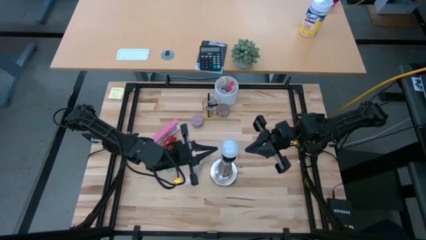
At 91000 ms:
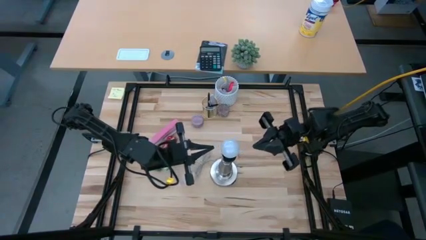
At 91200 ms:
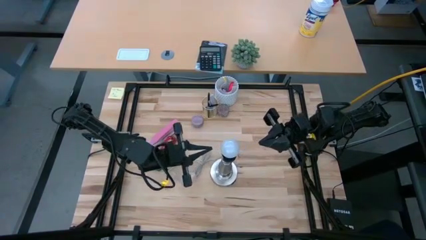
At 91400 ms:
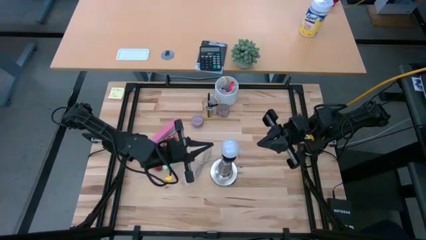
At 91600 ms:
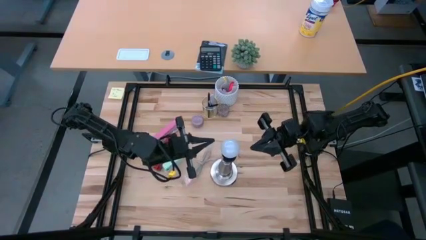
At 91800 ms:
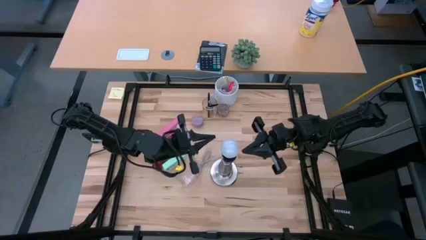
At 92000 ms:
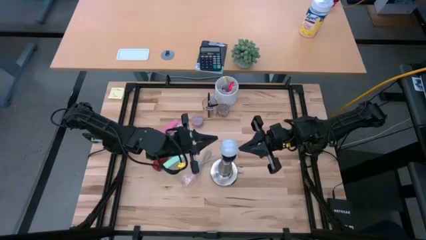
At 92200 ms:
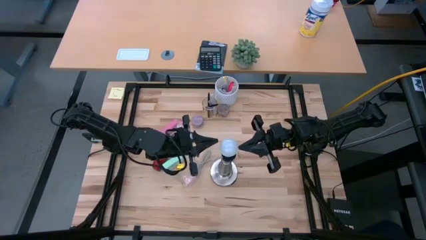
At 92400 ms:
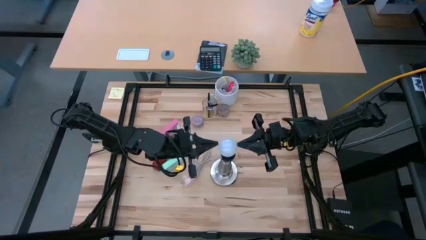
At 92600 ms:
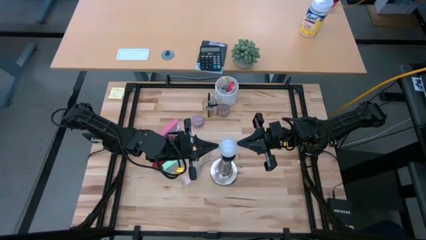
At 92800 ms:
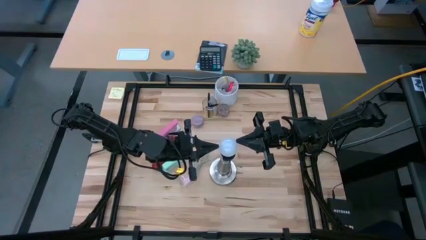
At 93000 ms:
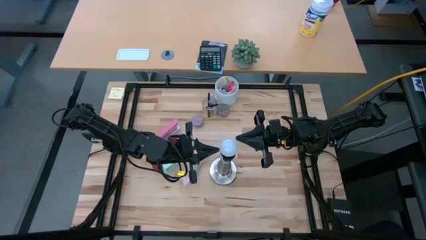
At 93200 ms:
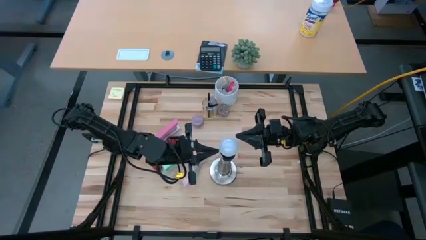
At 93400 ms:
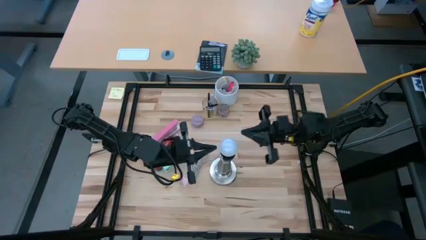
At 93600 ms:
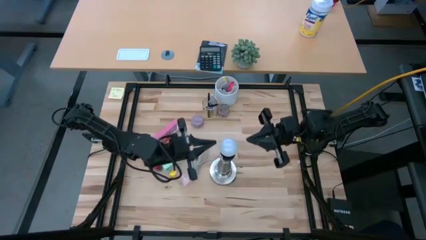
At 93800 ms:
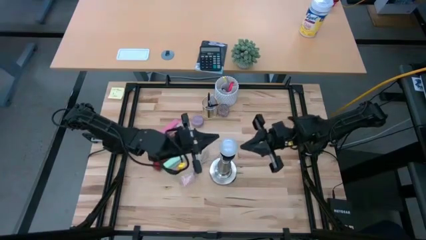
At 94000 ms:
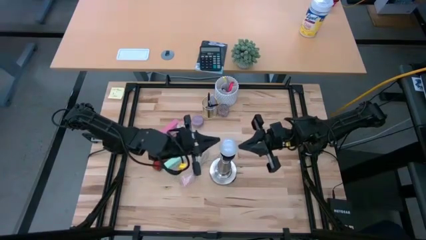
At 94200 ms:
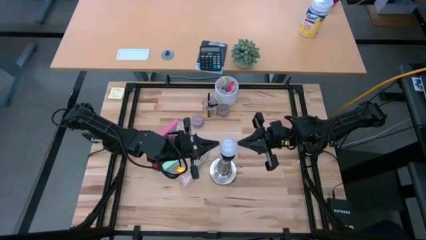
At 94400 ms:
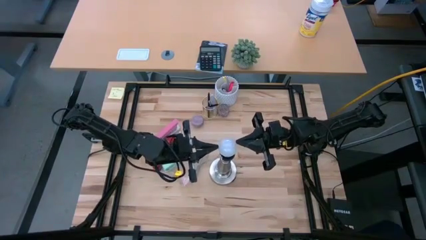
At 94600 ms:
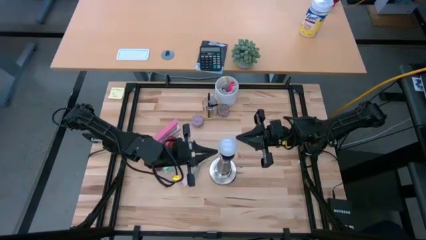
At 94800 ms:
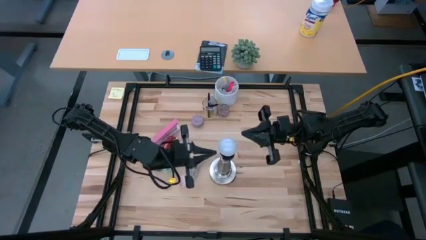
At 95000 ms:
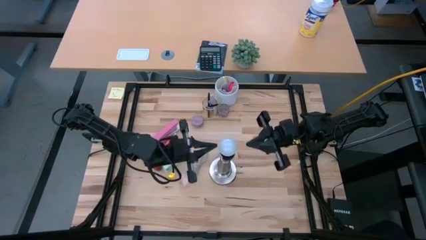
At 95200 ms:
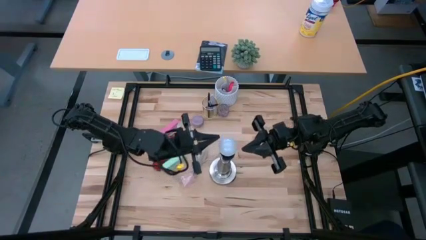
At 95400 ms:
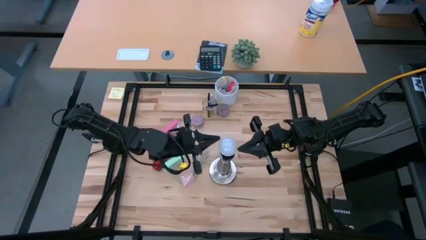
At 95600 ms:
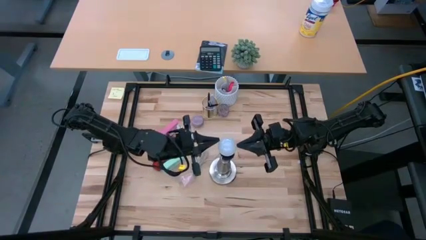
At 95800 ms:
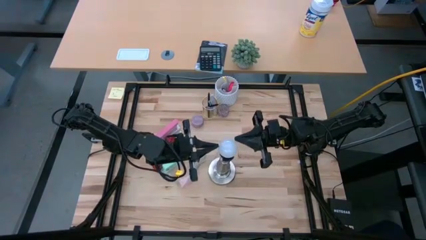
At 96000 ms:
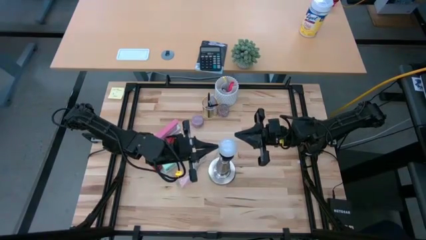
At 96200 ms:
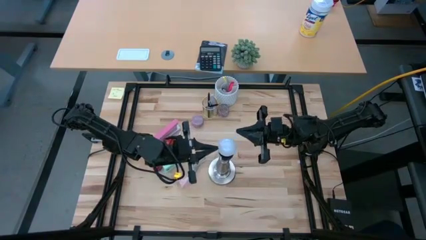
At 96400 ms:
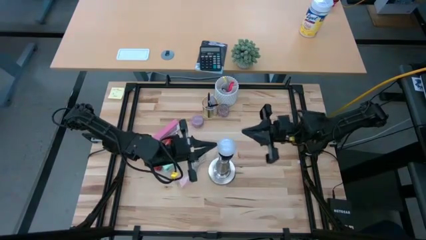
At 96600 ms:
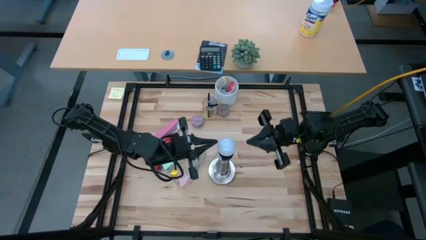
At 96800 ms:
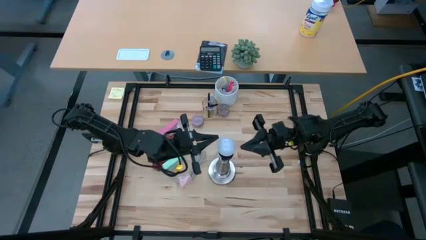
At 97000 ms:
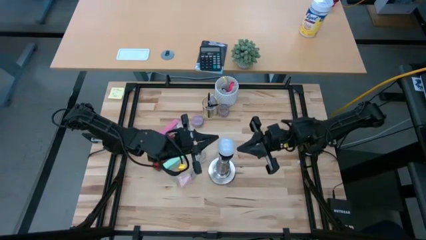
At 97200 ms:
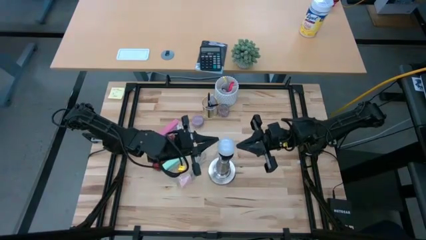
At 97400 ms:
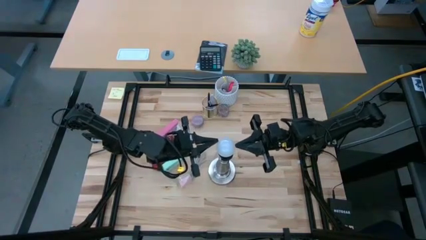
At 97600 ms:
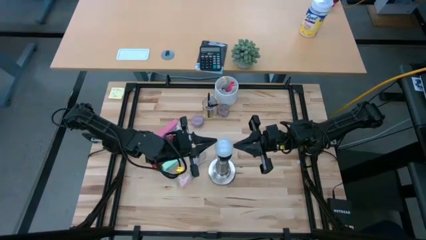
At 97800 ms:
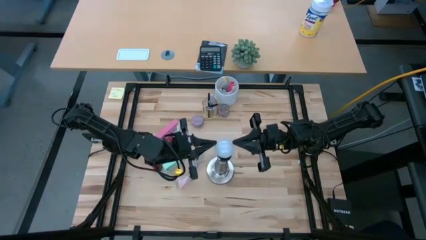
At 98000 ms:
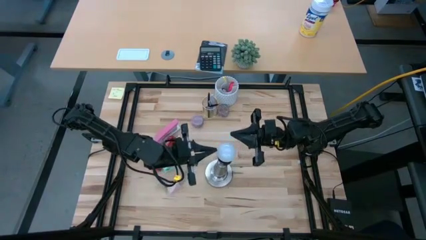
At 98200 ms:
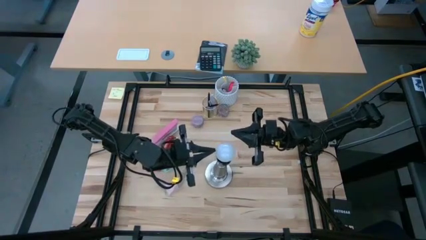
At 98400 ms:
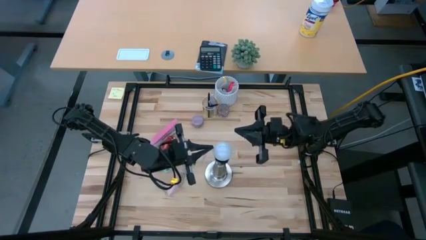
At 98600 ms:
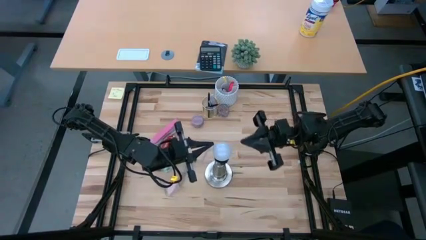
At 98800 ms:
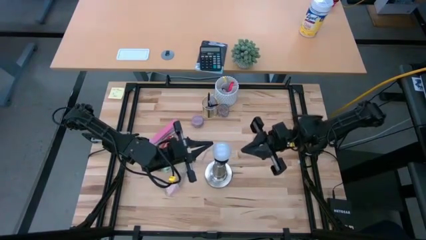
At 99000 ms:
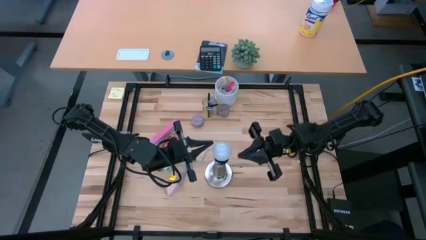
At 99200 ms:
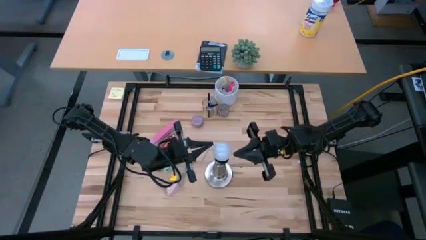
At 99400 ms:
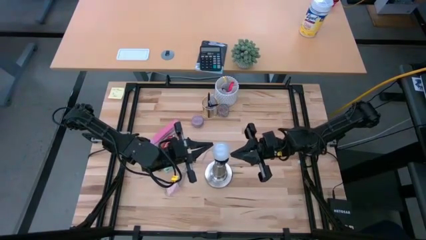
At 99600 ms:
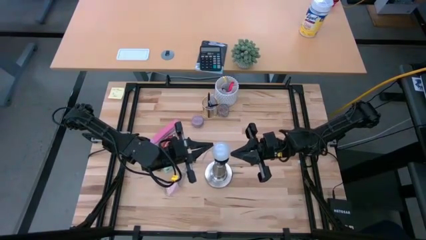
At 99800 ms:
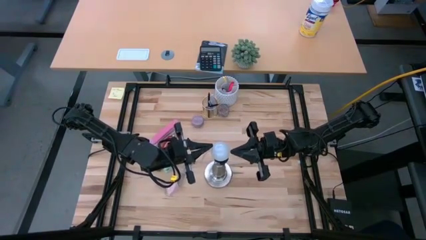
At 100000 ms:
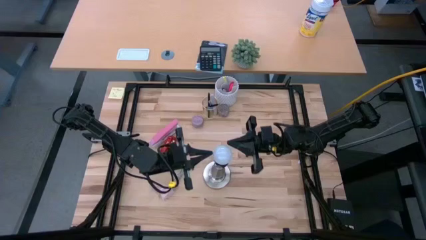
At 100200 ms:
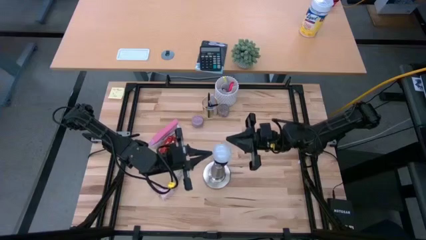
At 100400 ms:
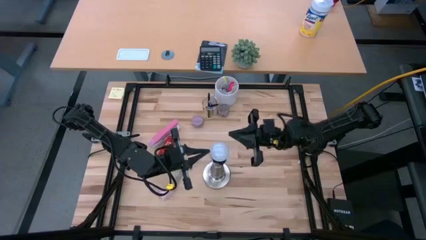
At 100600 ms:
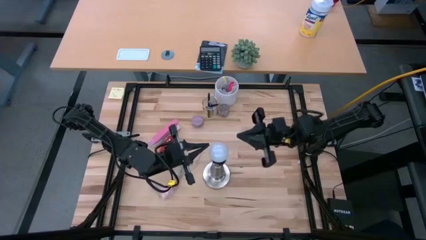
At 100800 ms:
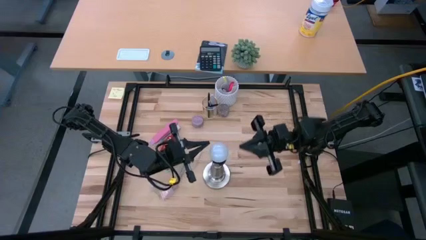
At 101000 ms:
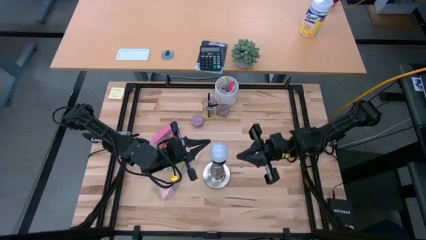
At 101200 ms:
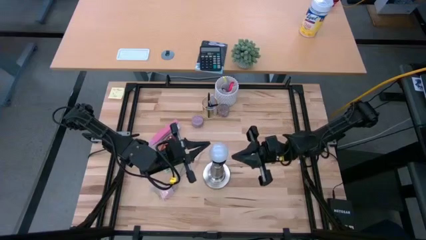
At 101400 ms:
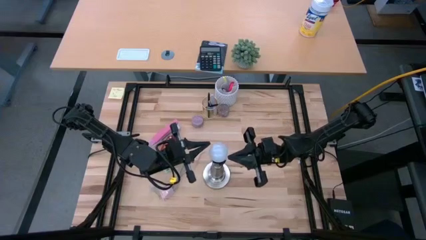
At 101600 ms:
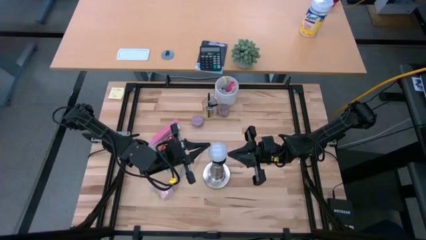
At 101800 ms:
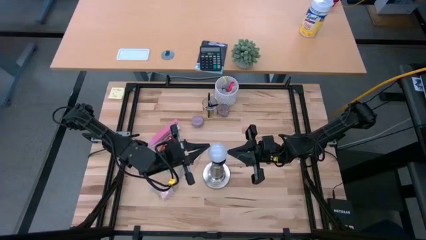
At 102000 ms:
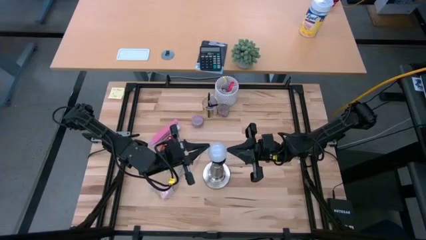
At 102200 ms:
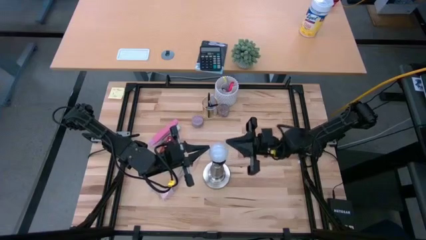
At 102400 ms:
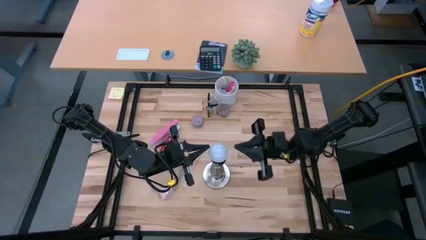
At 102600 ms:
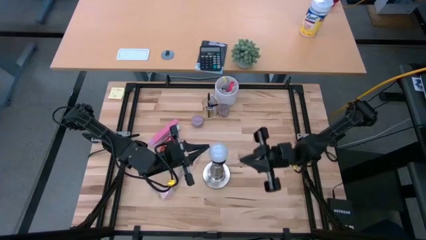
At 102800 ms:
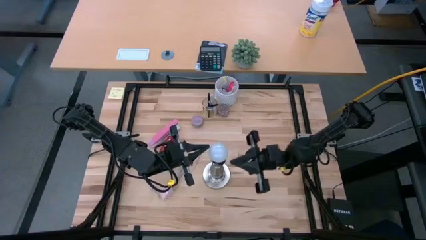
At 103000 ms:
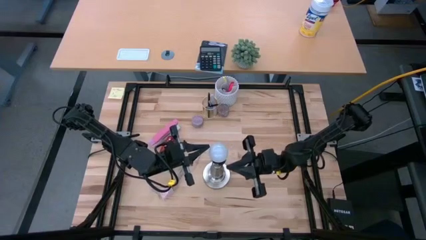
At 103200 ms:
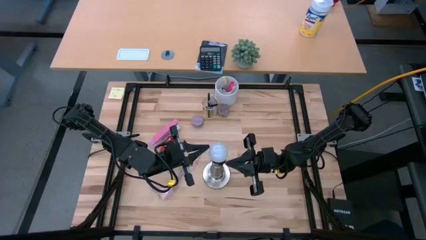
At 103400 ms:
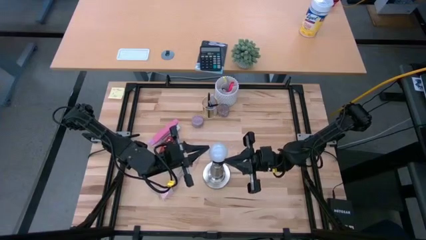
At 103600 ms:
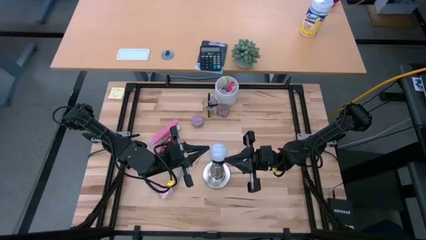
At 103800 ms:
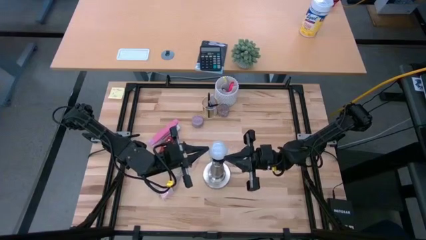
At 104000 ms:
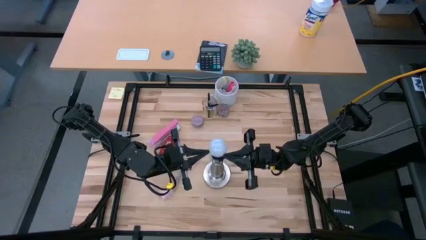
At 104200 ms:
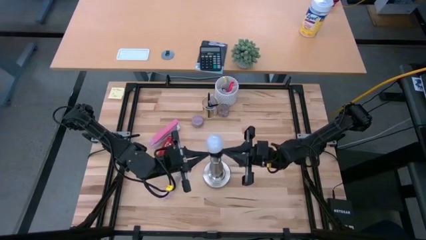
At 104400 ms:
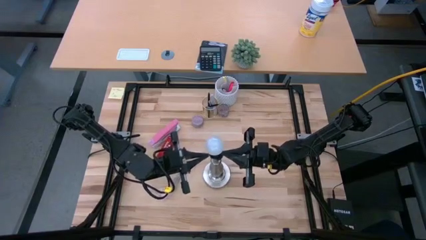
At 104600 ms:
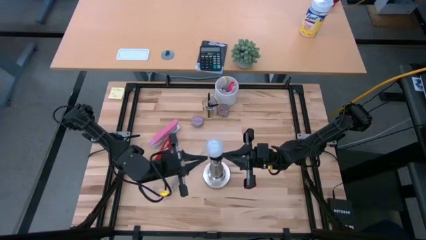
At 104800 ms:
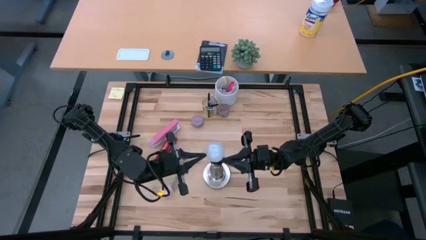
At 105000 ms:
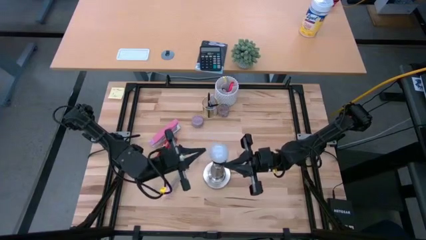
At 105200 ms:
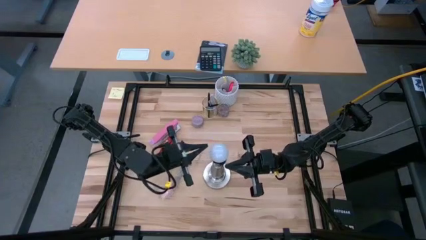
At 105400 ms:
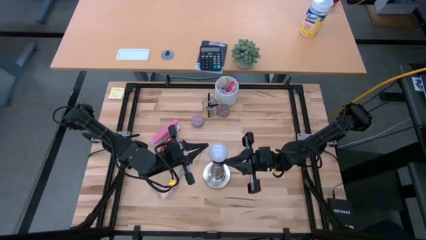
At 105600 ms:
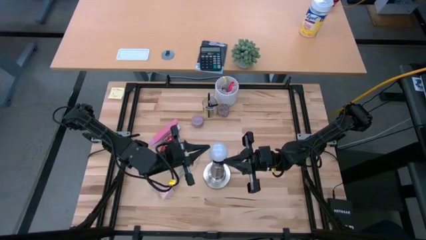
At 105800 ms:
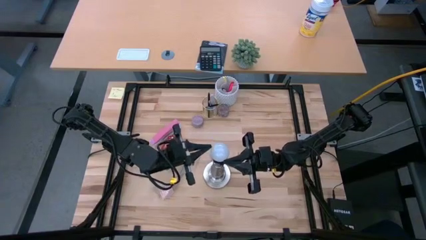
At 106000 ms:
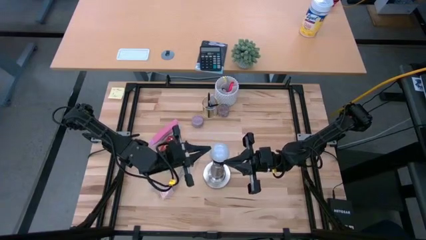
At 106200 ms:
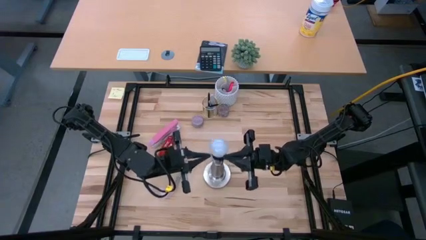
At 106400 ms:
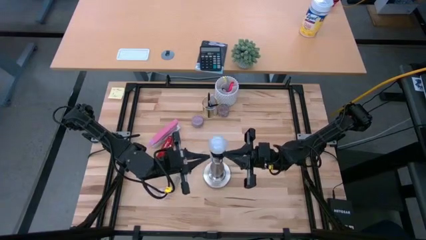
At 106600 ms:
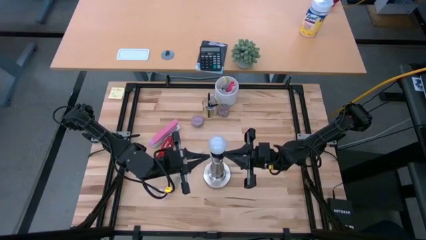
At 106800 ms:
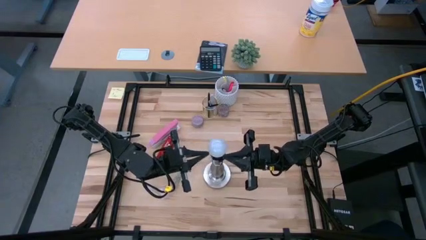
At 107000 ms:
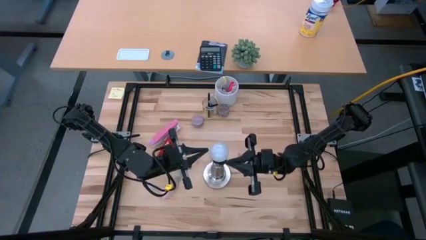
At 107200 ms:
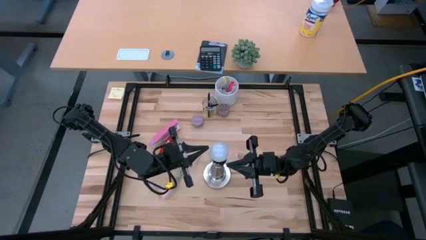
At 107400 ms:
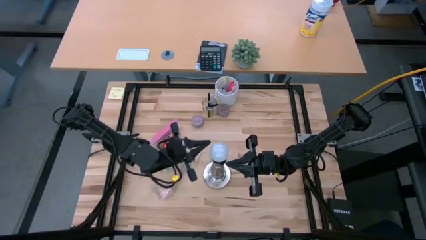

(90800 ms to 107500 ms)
Task: Screw lightbulb
Remove the lightbulb from the lamp
